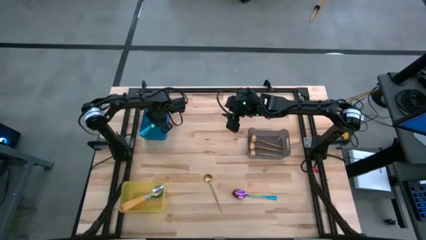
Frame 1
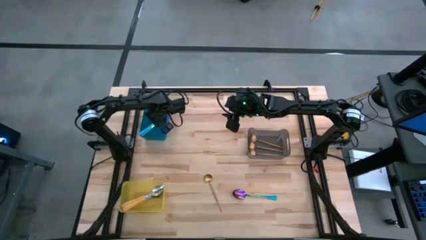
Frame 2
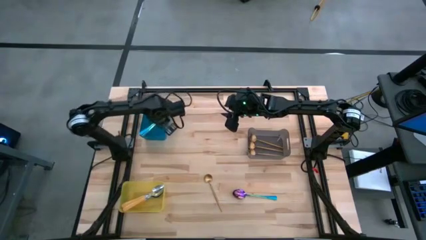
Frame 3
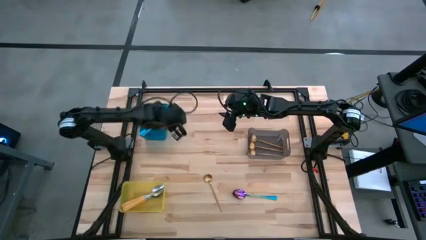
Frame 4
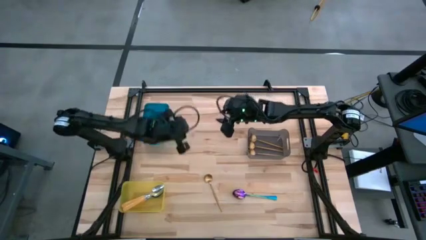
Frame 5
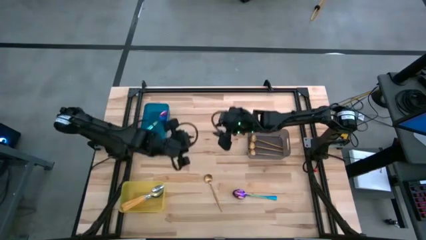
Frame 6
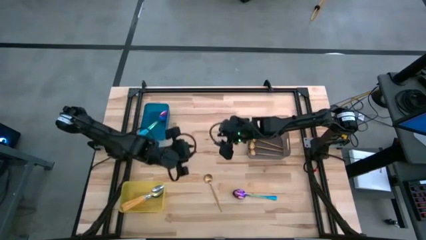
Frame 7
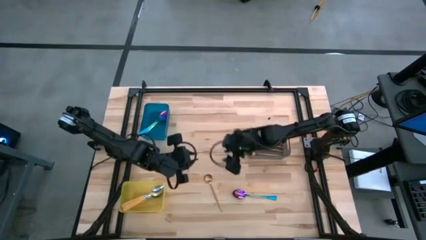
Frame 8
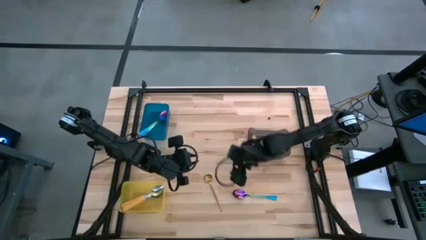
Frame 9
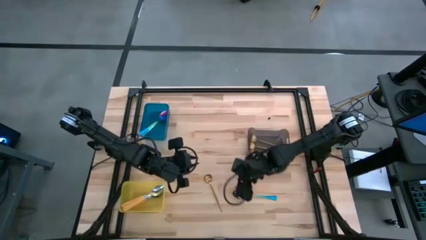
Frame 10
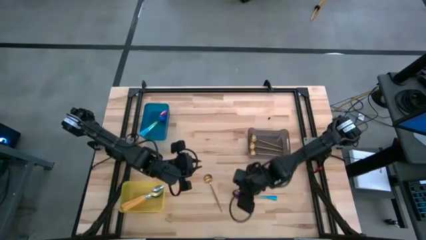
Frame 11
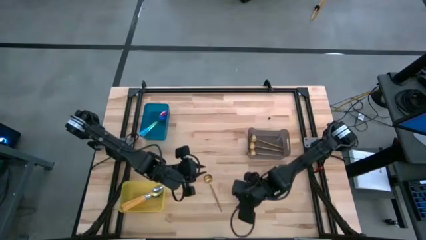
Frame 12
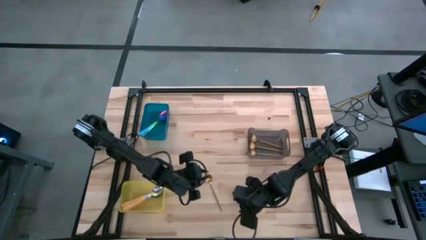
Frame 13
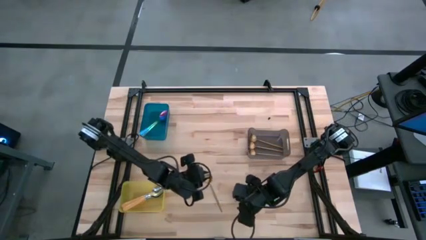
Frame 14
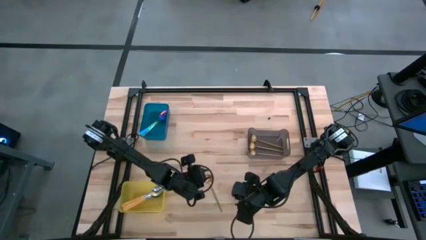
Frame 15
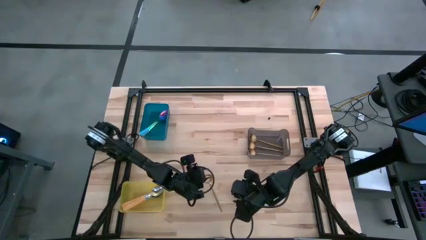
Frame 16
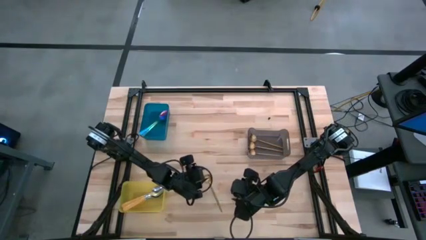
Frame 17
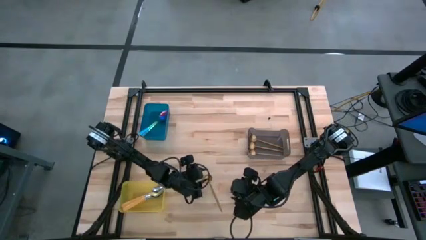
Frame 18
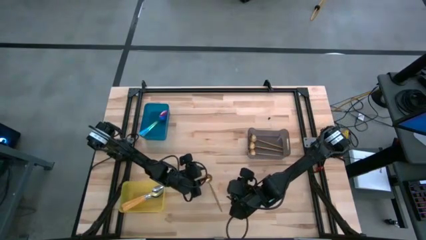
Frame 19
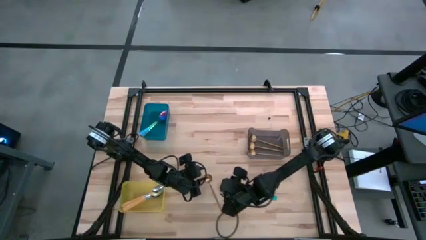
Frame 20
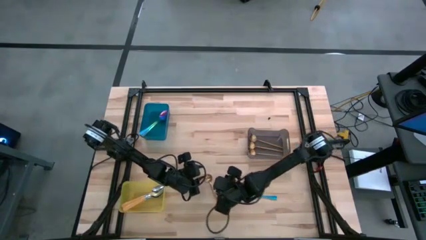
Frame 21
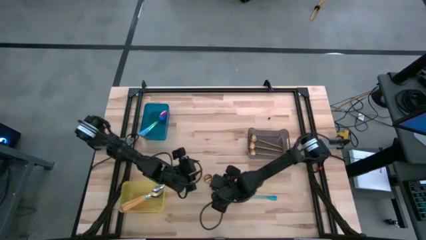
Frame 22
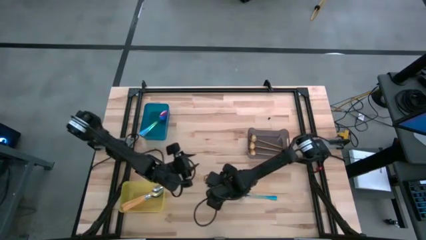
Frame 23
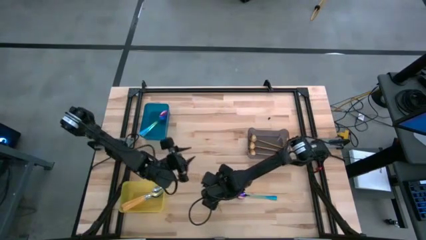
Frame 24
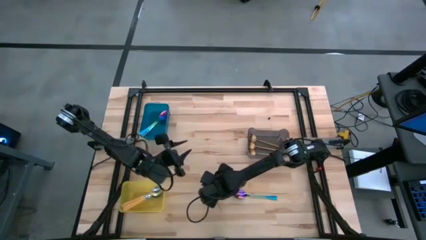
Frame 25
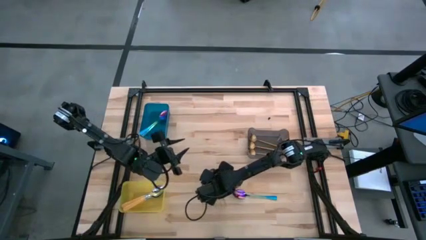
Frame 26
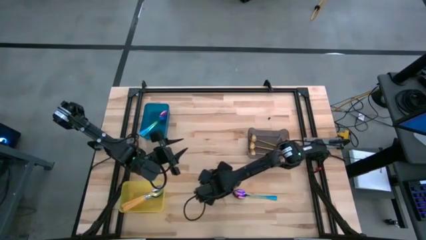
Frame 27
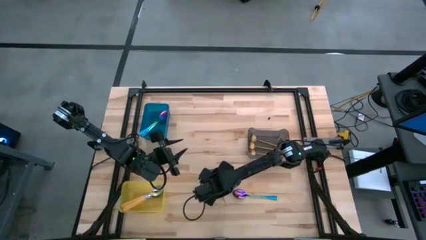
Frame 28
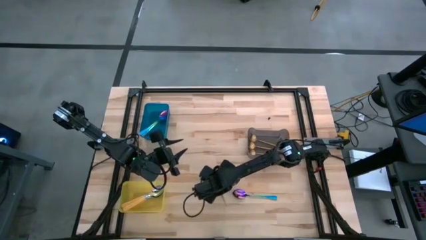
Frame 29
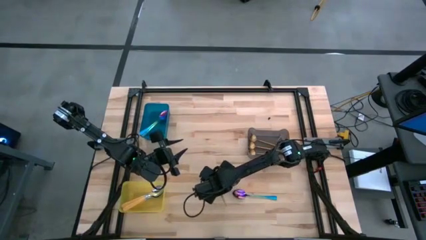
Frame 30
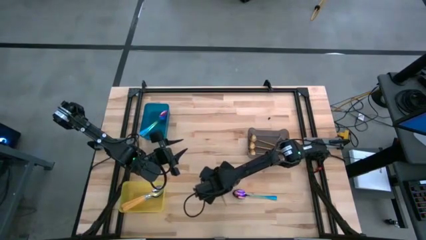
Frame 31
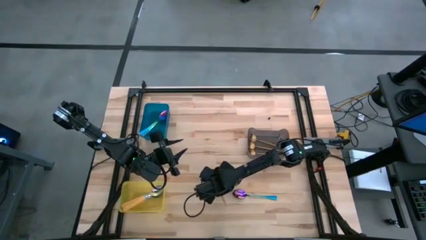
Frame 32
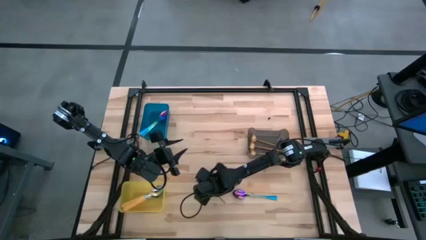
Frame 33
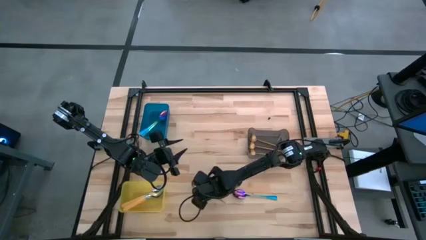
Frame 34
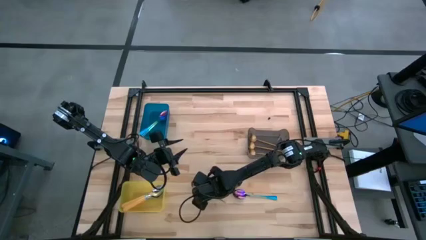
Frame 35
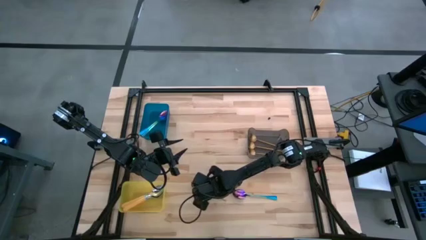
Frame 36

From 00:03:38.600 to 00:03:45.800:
Task: Sort silverware by color (type)
Put the gold spoon into the black bin

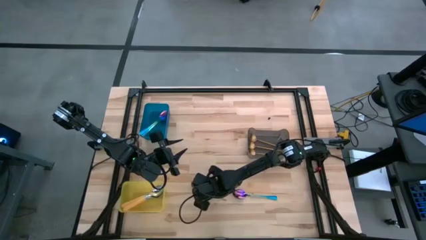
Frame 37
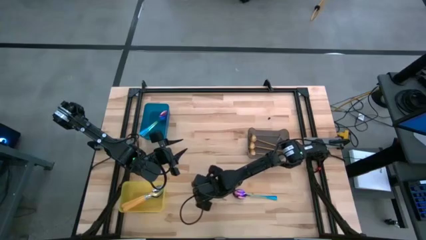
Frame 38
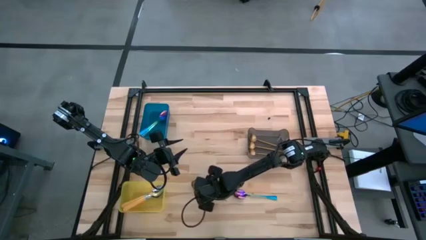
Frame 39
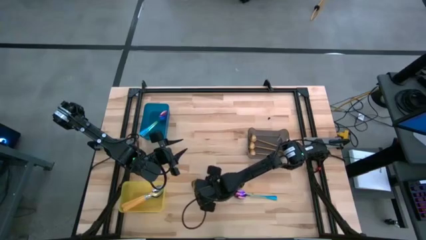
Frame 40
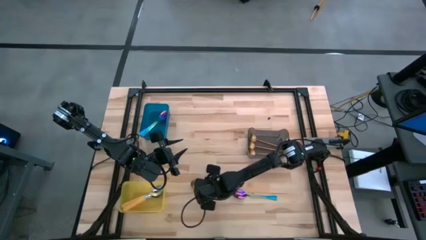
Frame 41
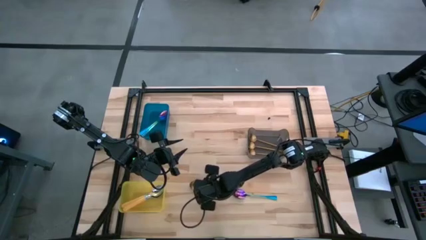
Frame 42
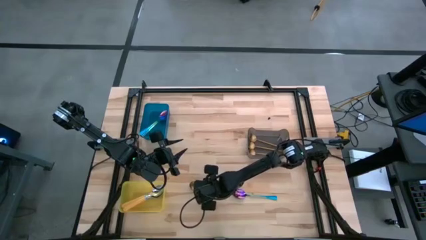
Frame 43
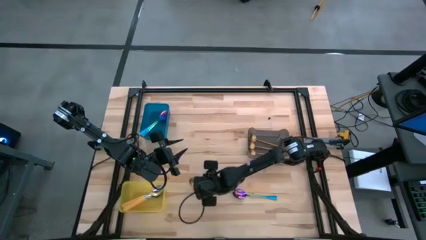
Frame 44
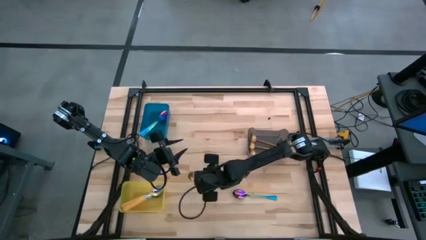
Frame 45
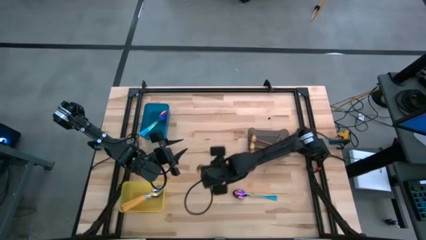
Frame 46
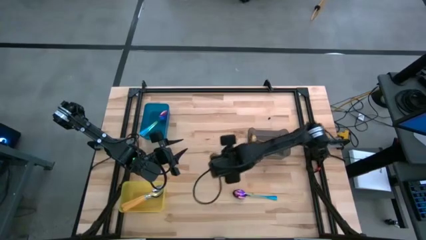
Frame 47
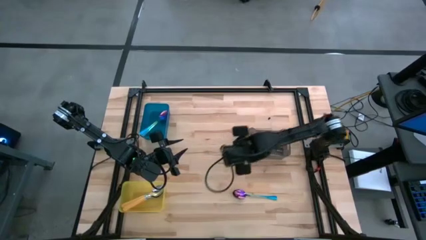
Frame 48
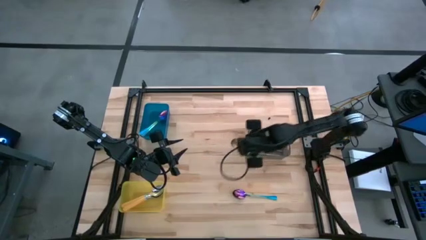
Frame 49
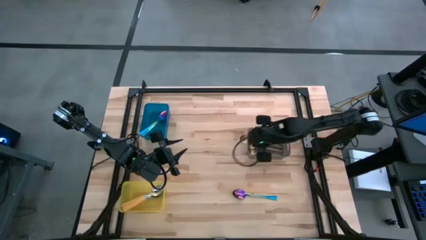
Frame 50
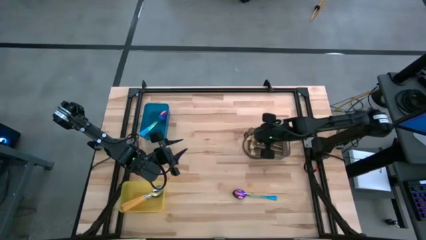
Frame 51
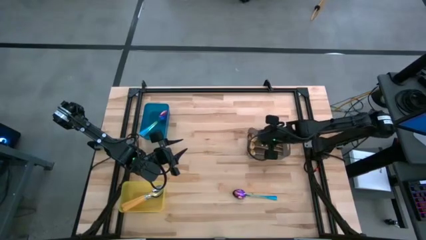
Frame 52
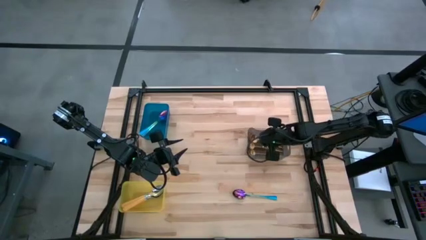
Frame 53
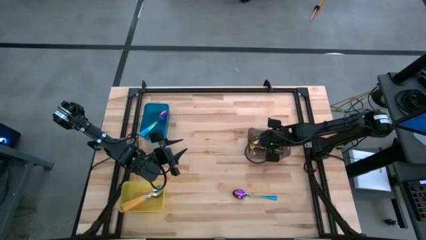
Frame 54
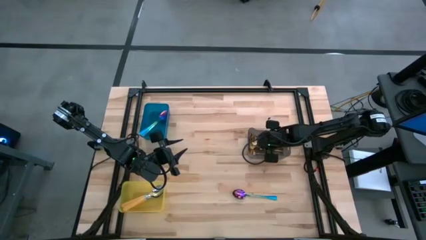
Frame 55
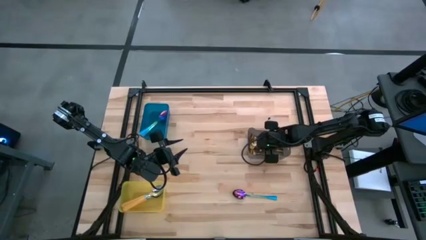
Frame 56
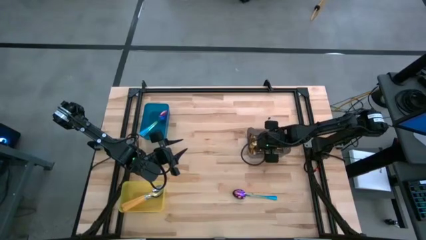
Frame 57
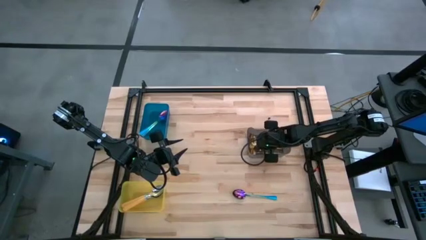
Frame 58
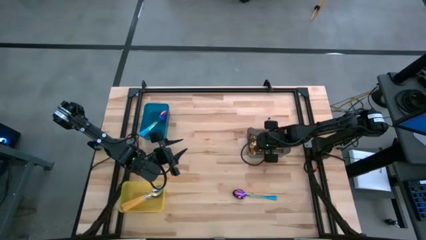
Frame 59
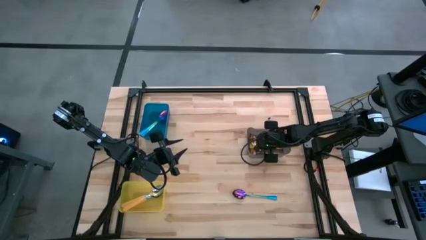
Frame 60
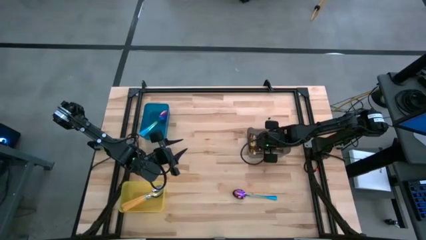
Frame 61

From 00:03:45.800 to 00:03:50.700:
Put the gold spoon into the black bin

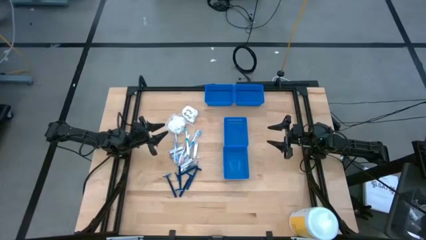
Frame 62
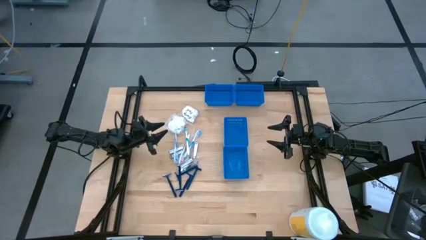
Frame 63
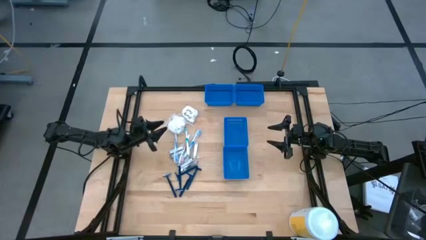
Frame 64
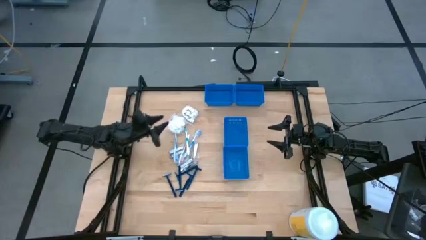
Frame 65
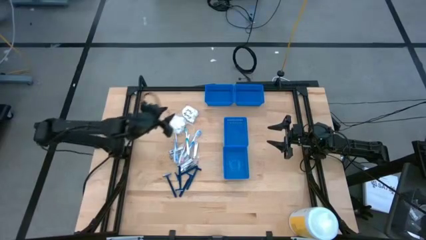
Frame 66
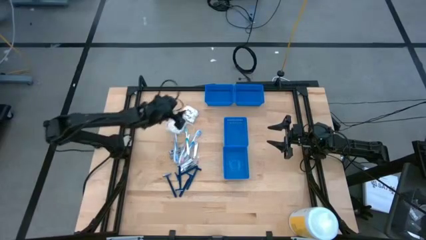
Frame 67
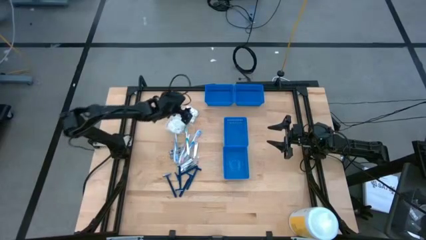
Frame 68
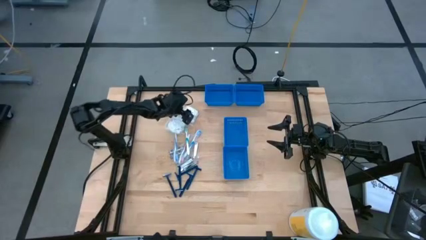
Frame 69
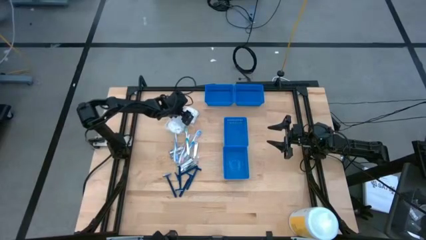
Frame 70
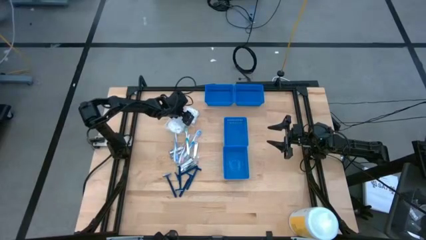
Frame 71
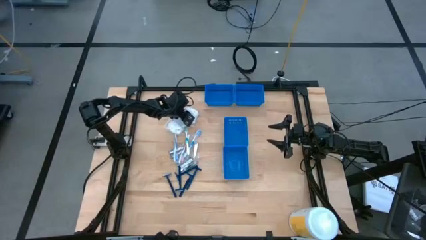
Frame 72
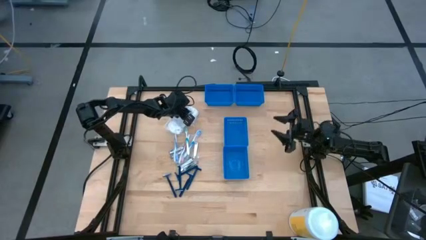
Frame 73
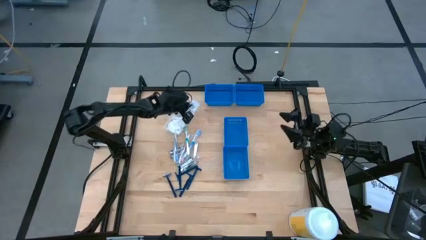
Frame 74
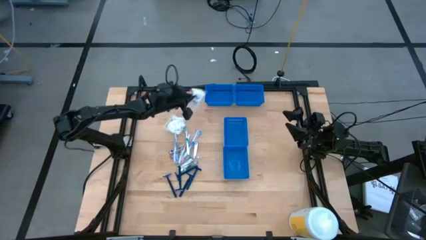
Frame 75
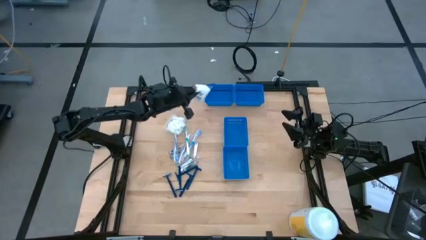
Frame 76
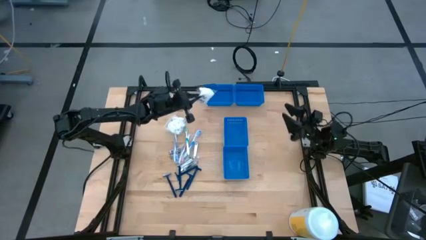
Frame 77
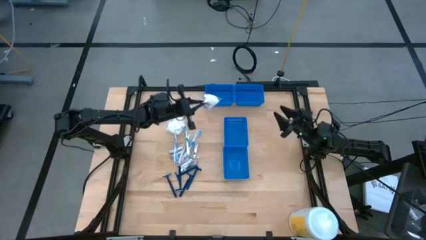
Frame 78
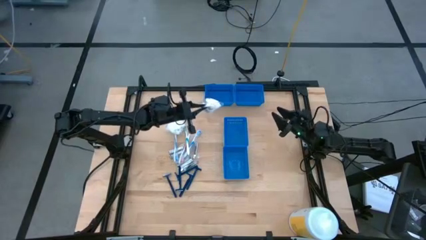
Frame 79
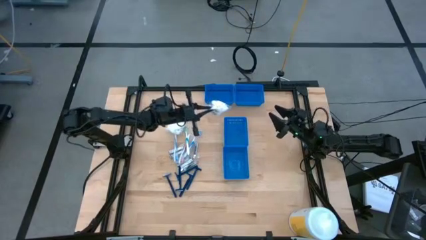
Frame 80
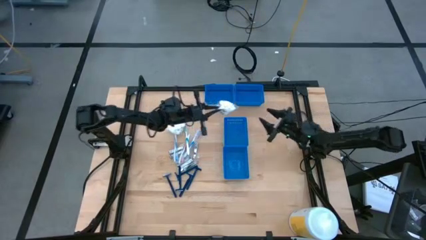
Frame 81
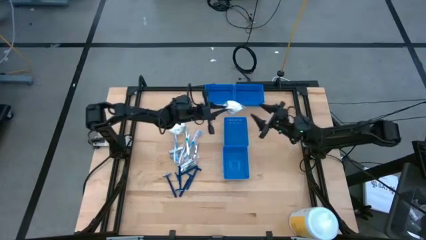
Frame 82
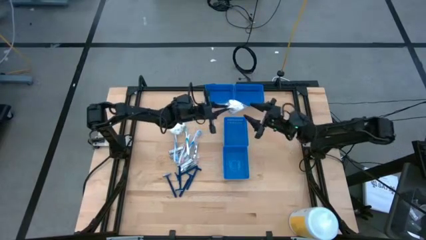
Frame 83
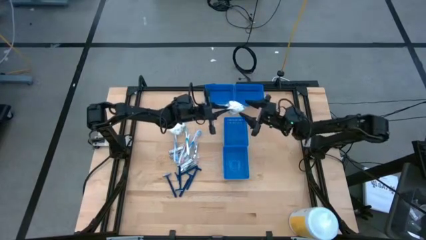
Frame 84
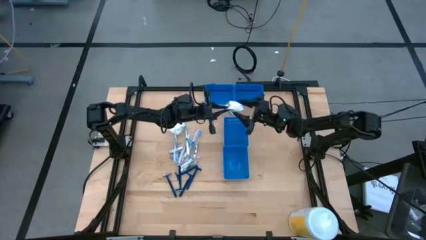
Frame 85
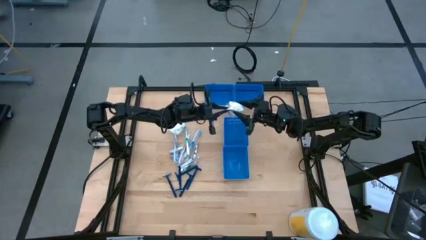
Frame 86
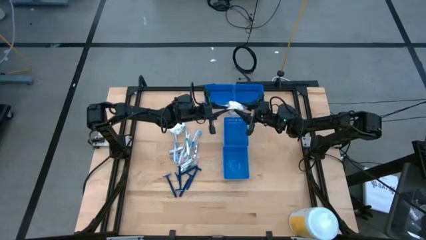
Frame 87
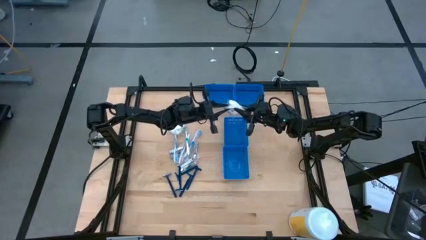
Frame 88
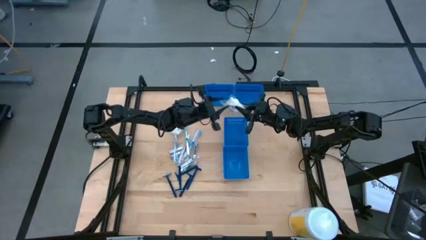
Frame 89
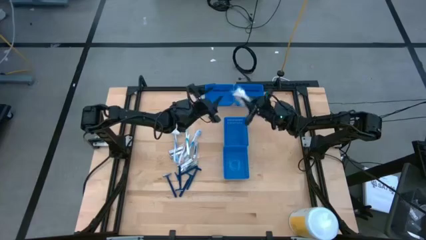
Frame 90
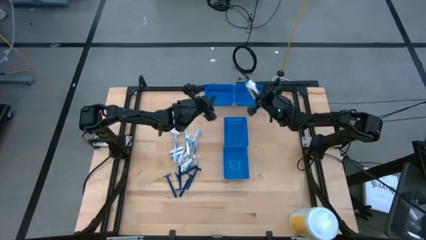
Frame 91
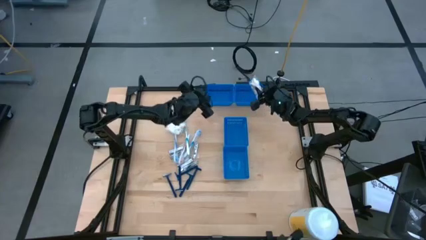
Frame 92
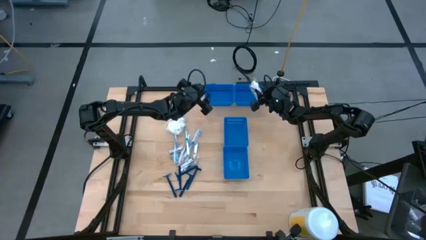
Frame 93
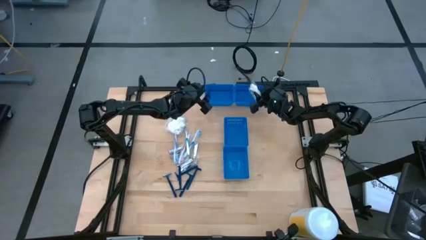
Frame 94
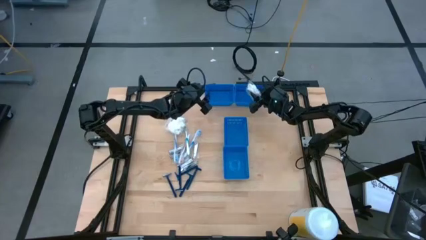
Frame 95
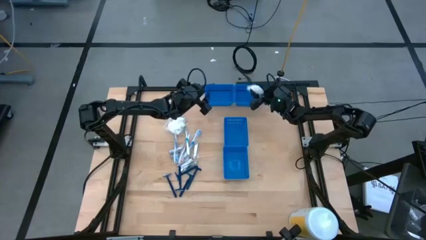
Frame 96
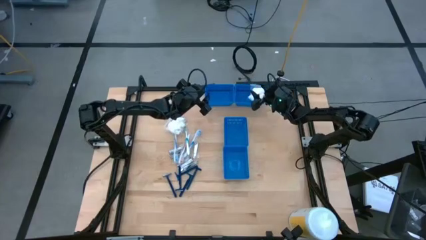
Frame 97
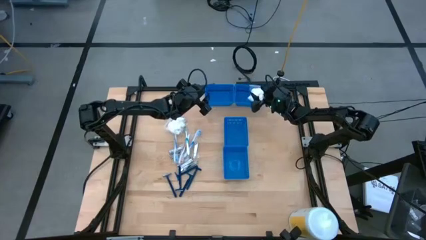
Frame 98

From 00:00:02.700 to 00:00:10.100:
Task: Pick & Place Travel size toiletries
Put the cotton balls in the top right blue bin
